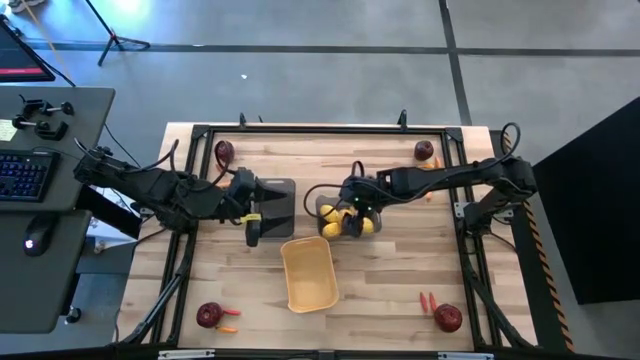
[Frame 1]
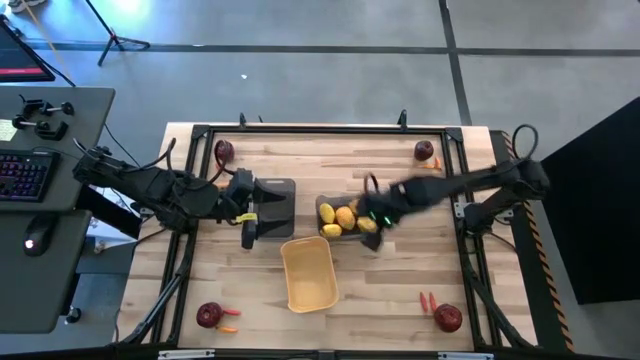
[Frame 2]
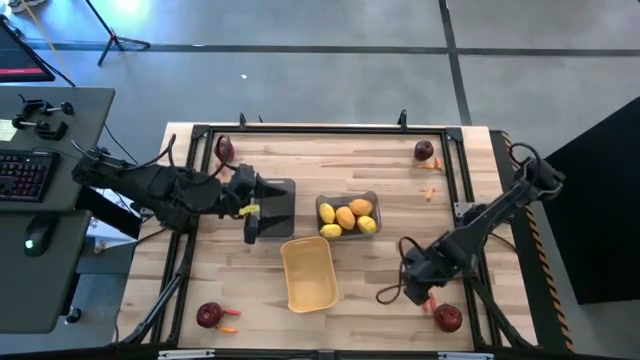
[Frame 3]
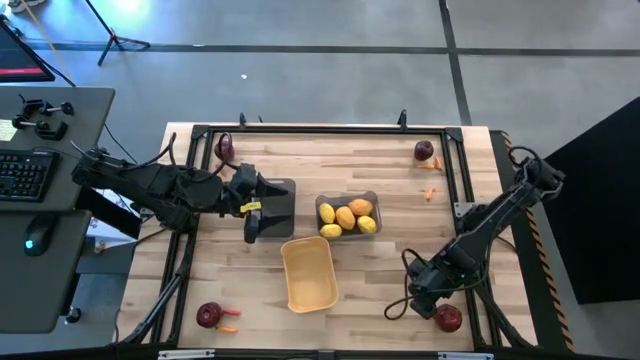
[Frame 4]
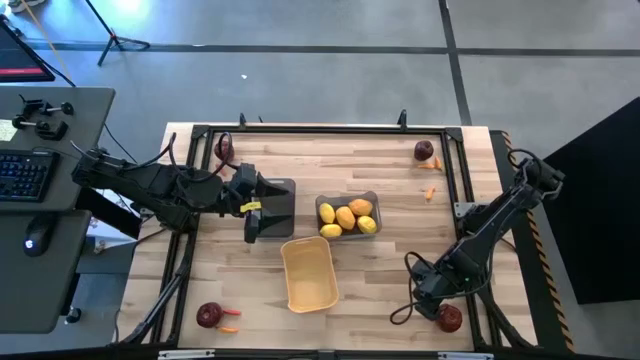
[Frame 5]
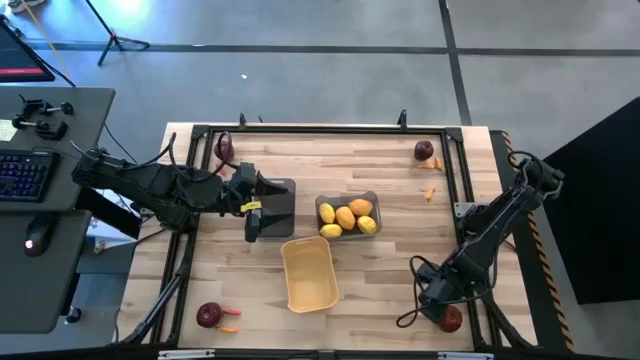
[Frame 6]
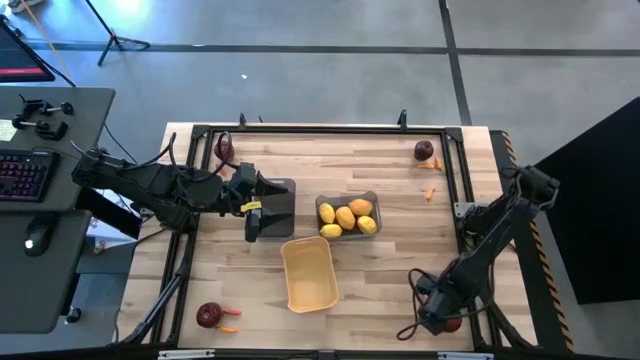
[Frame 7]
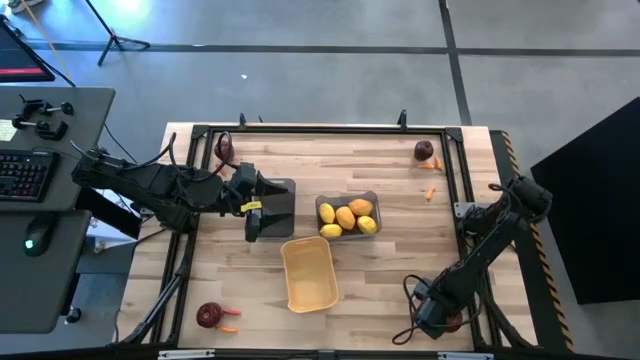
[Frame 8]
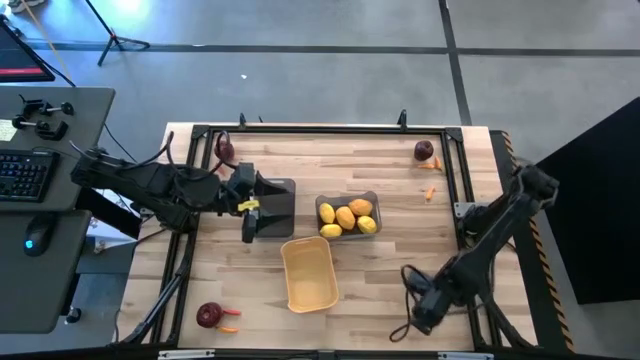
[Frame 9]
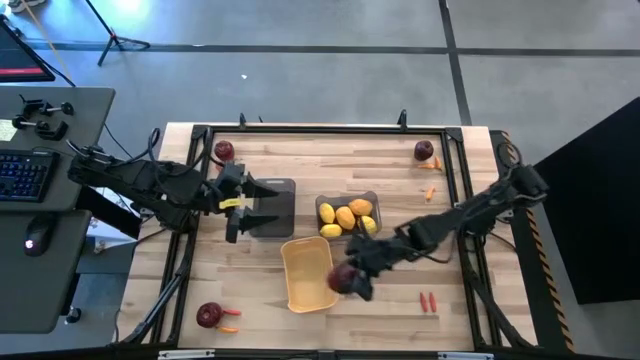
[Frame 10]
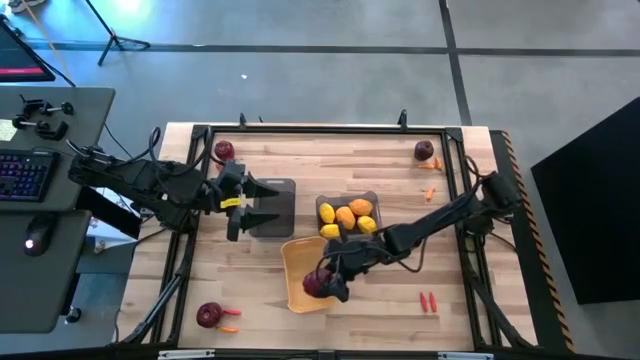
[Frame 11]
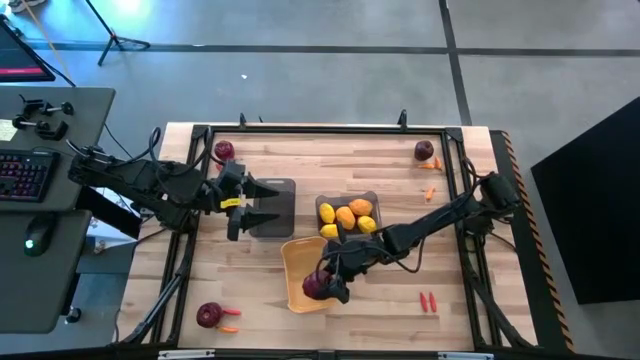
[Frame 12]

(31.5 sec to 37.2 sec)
Task: Sort produce into baskets
Put the apple into the yellow bin

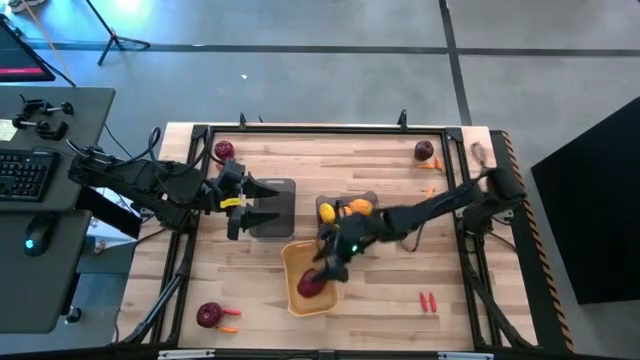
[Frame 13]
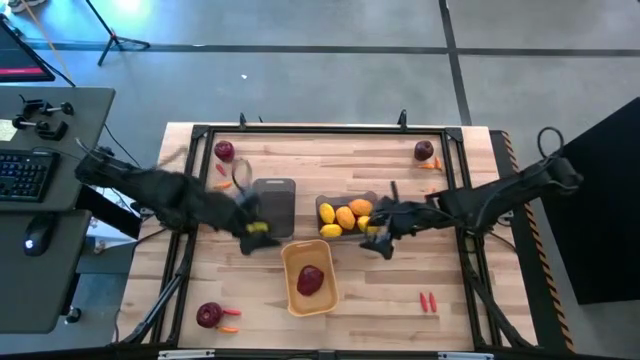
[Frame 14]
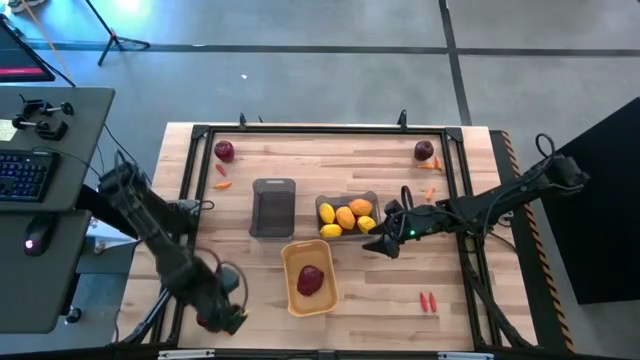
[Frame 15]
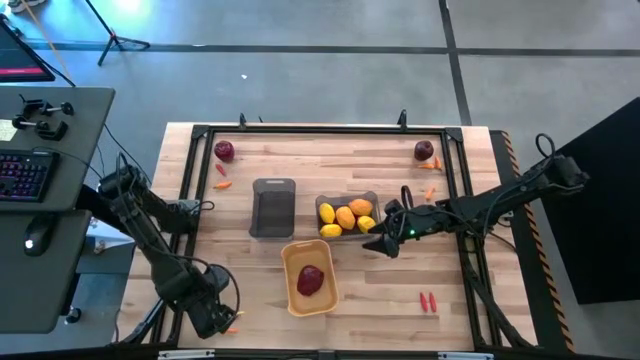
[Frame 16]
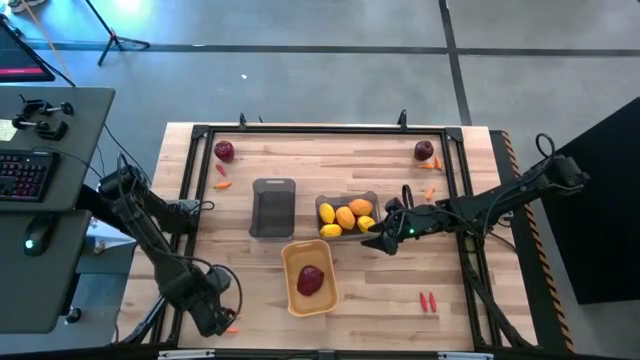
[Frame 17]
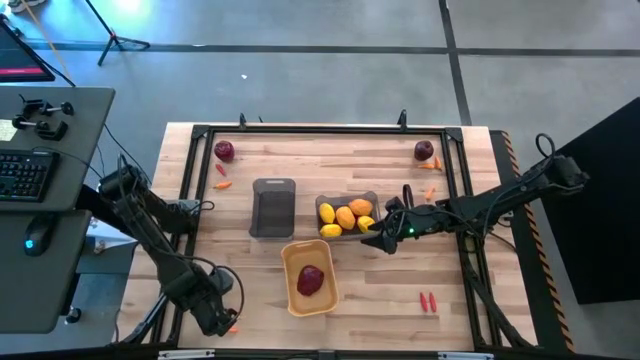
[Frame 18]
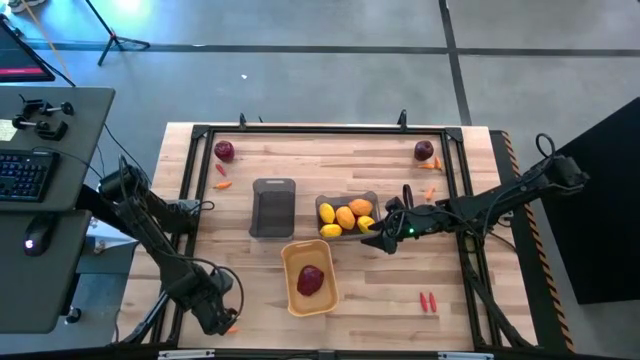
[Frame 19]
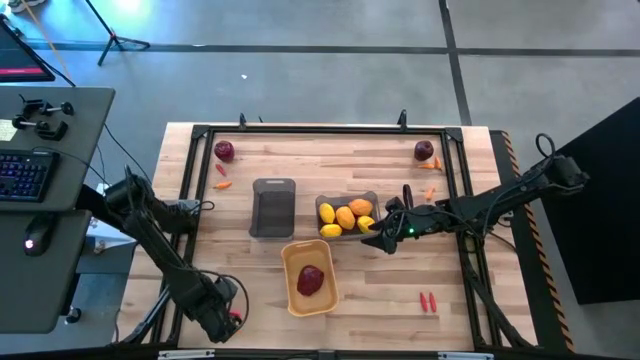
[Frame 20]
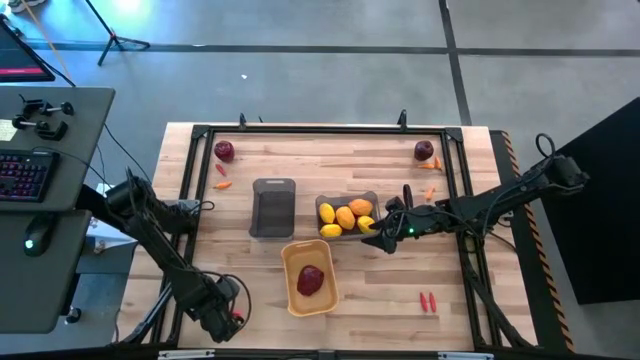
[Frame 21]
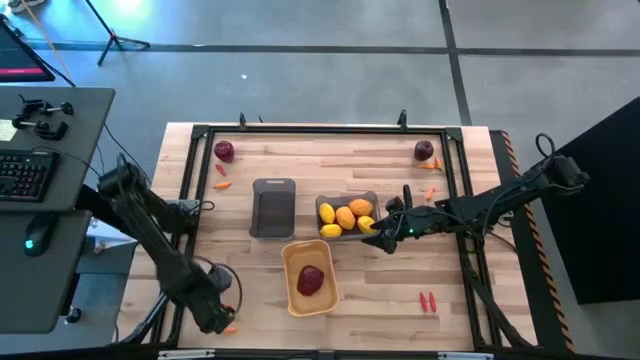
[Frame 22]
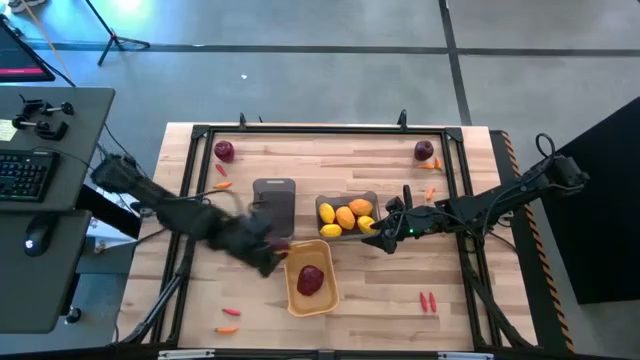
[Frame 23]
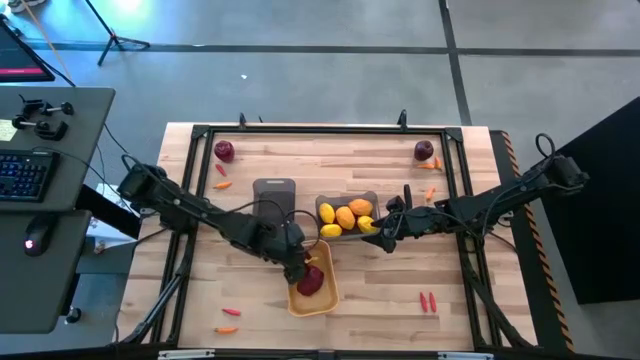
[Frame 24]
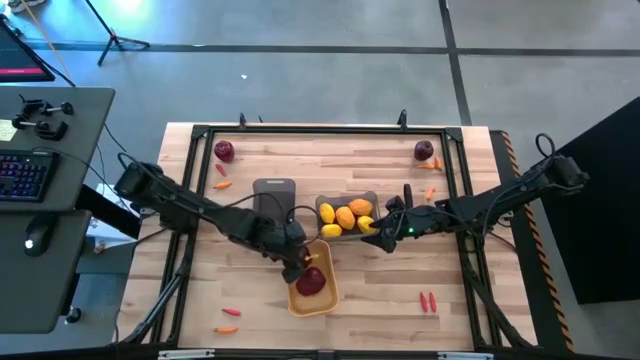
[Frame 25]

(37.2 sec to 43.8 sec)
Put the apple into the yellow bin

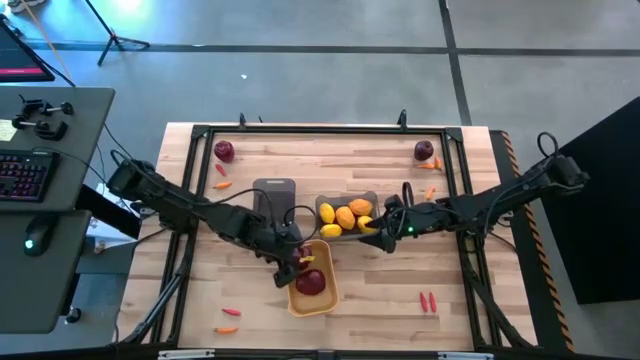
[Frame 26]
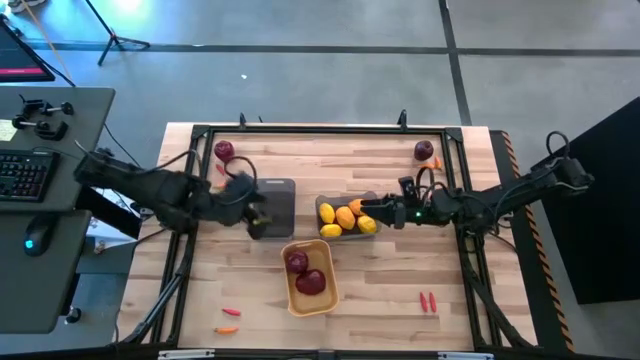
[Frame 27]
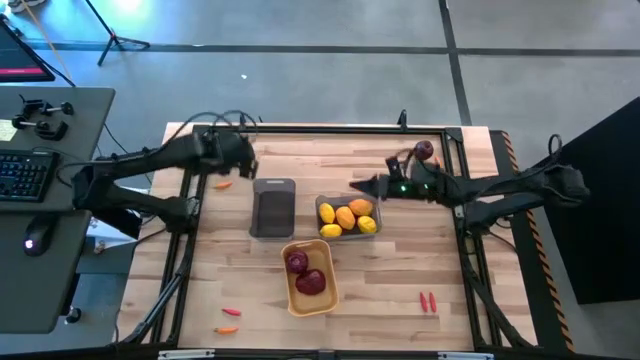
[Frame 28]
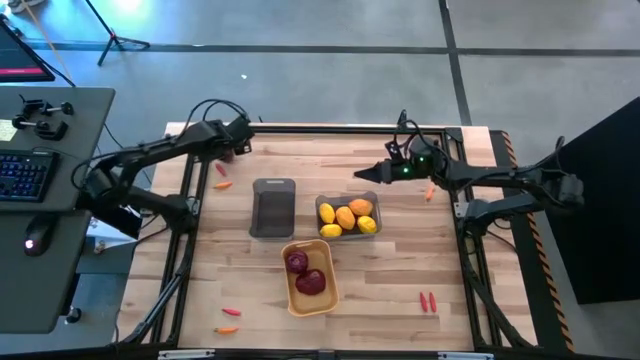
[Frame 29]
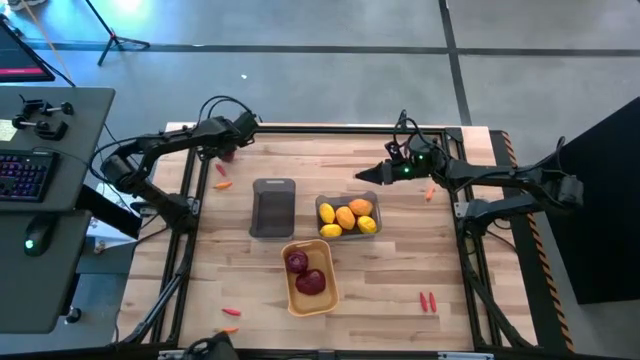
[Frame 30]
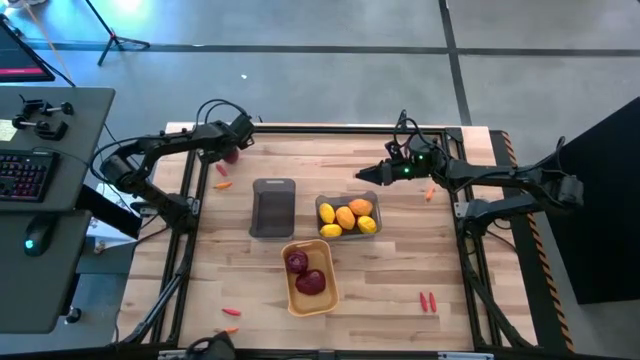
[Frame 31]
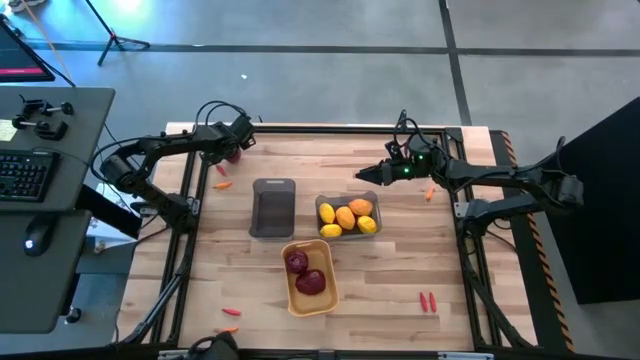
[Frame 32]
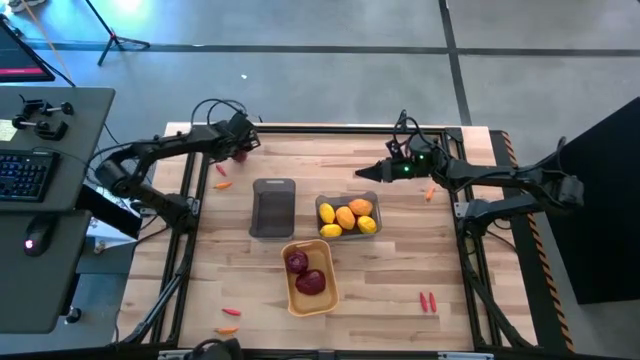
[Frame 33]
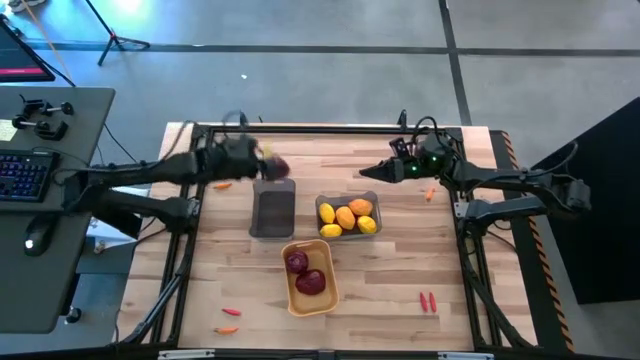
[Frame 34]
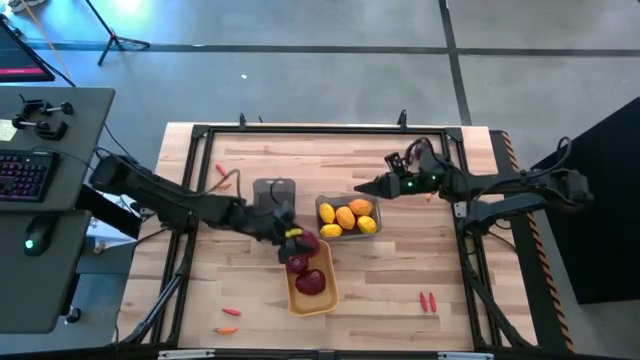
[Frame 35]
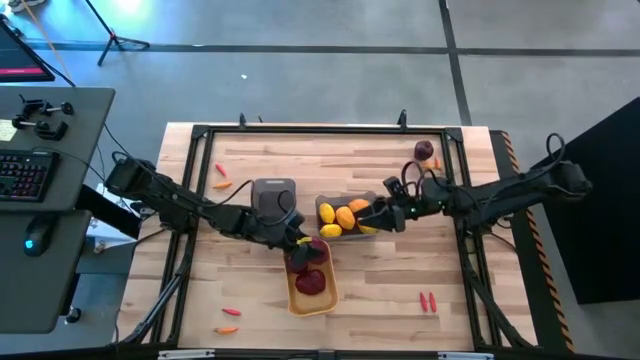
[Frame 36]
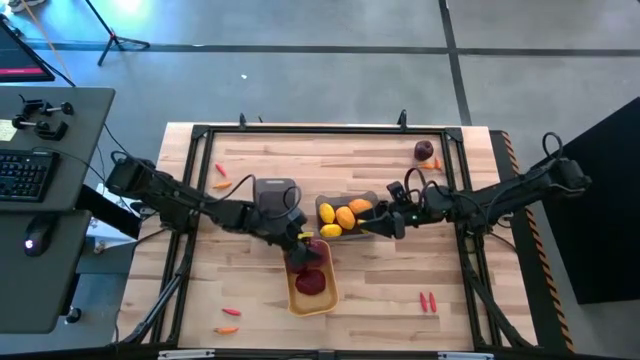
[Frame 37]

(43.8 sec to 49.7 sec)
Put the apple into the yellow bin

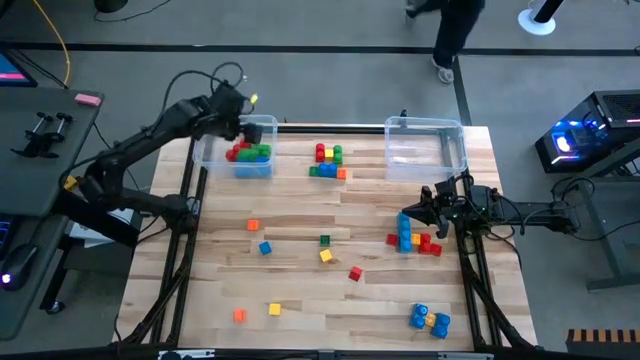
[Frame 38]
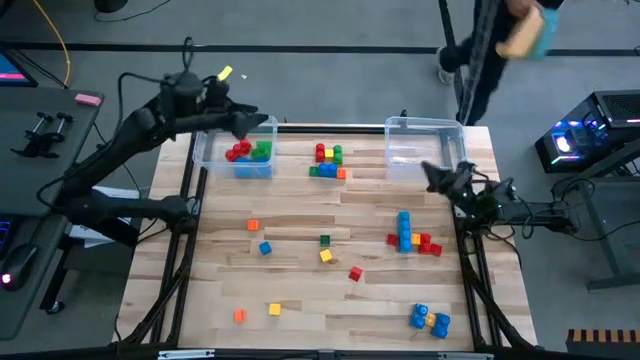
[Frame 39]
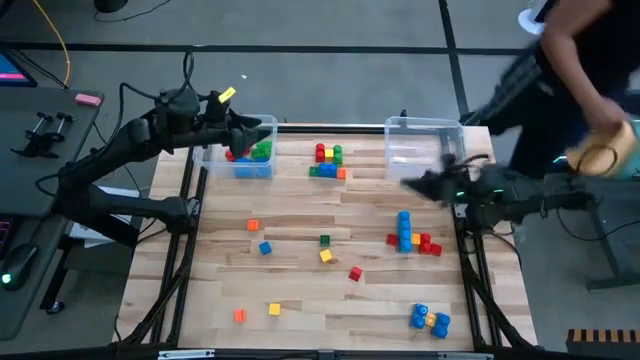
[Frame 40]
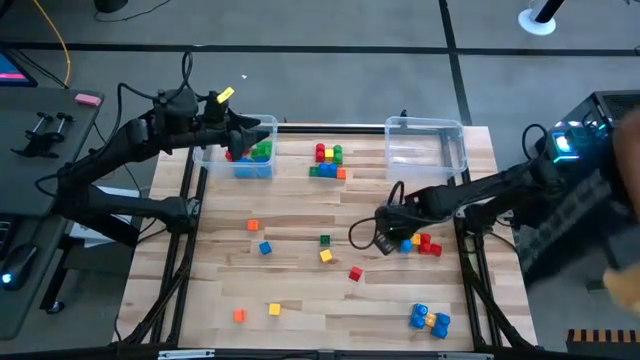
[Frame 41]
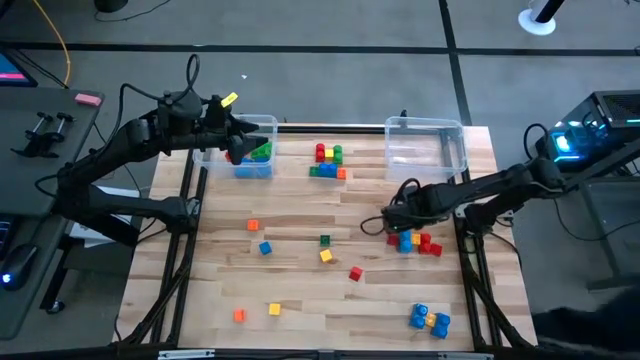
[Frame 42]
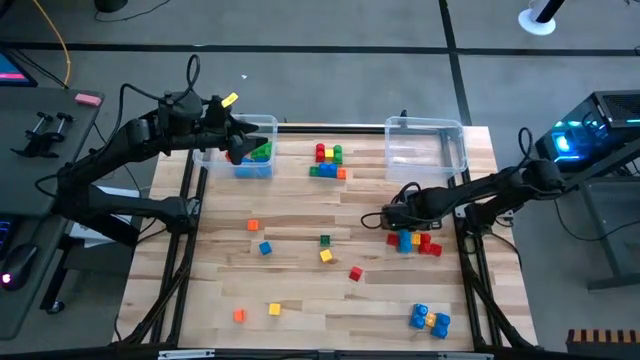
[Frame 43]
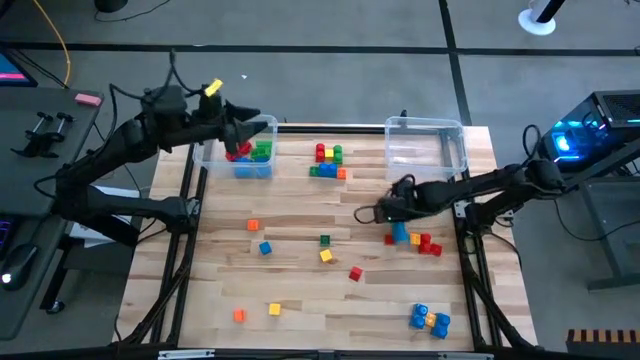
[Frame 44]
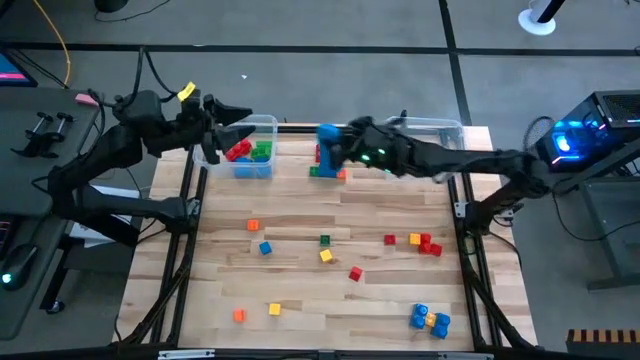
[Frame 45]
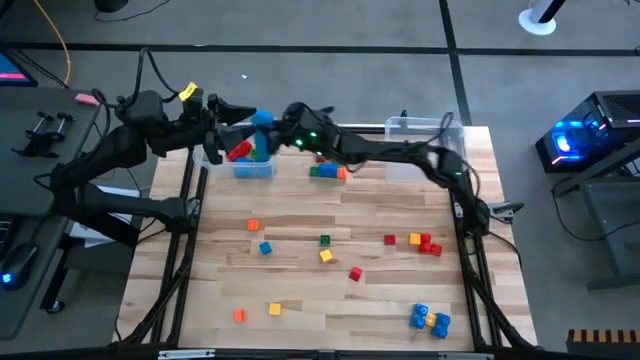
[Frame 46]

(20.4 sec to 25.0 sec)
Task: Sort blocks by size
Put the large game piece into the left transparent bin
